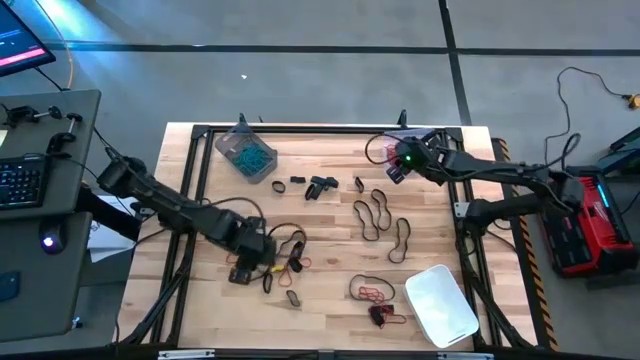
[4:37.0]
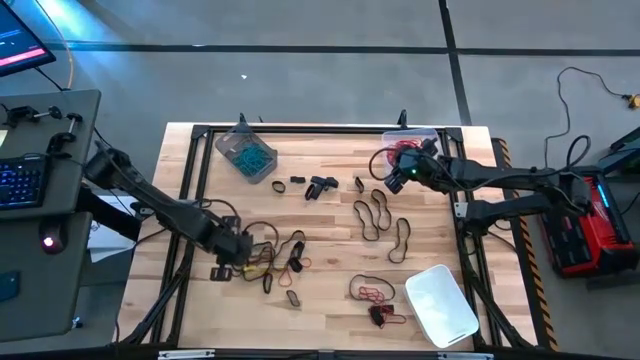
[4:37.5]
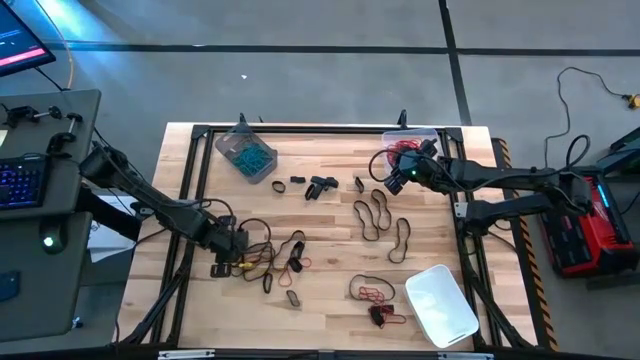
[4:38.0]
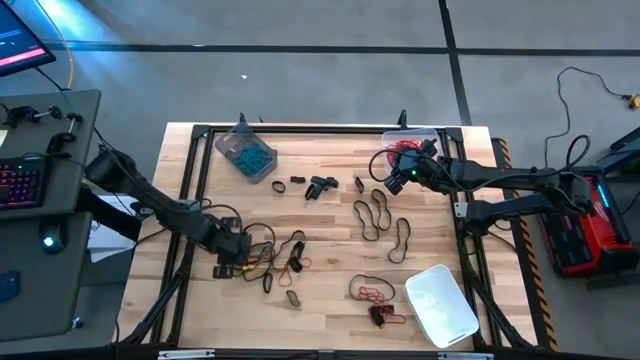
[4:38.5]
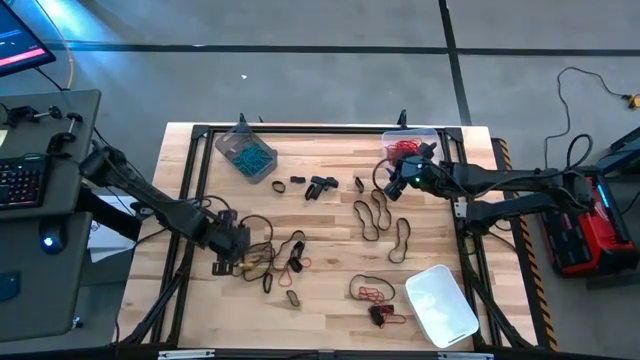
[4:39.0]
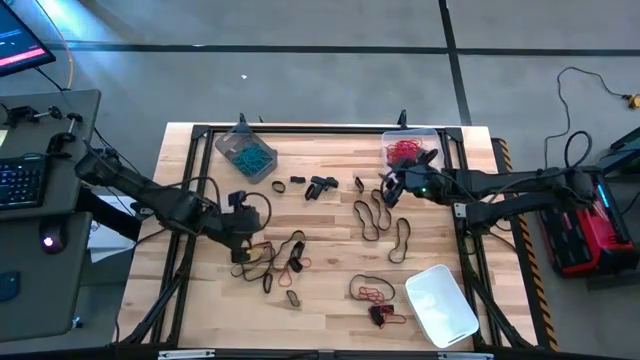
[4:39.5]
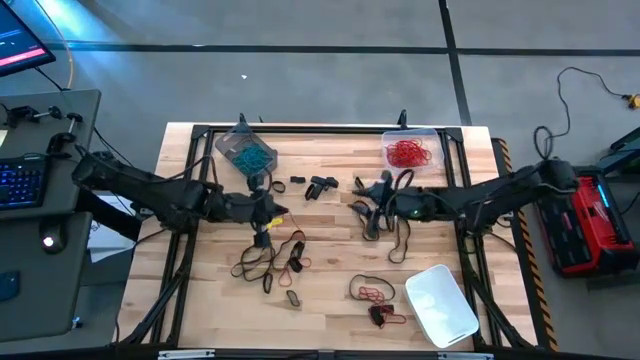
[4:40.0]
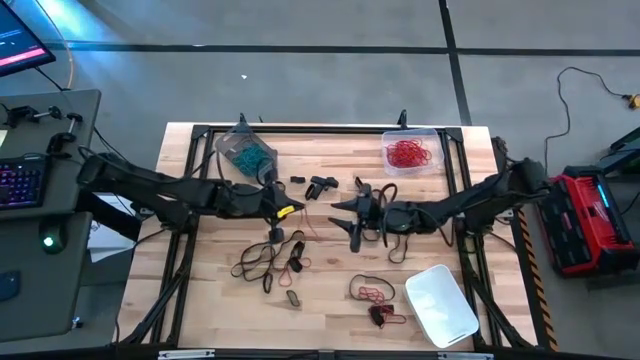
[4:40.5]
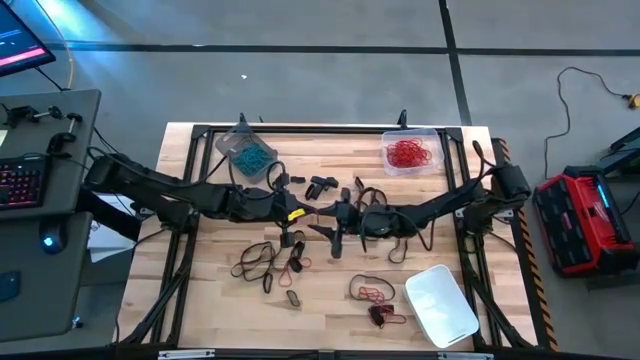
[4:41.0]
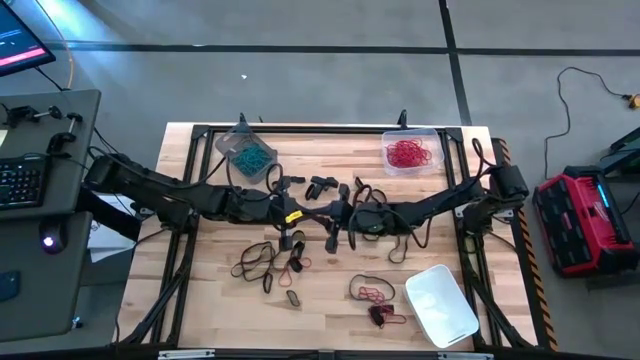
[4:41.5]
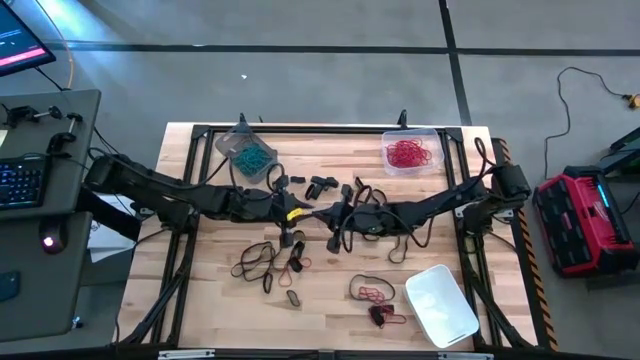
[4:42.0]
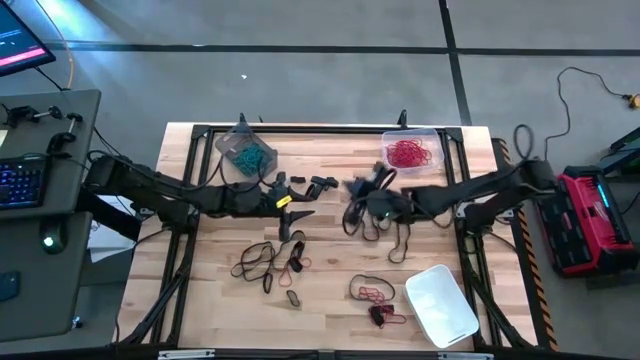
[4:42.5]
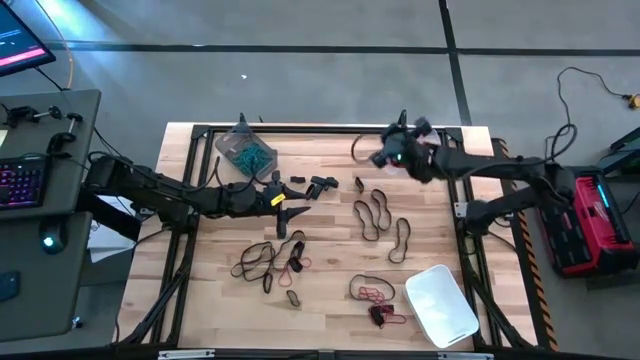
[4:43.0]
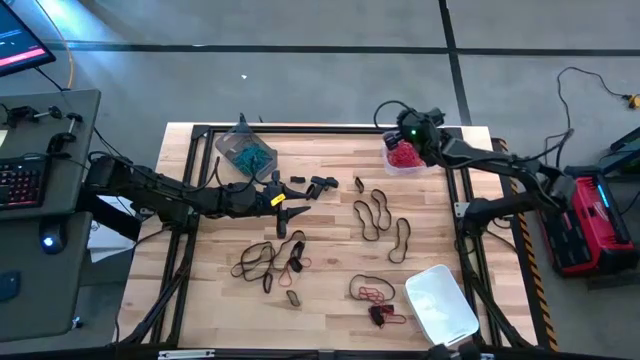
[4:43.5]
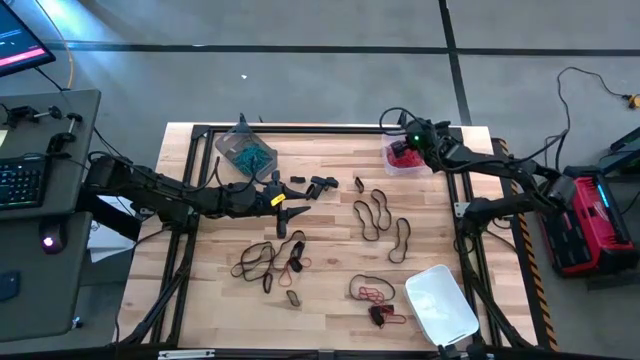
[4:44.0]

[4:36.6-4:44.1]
Task: Sort rubber bands into baskets
Put the red rubber band into the transparent bin

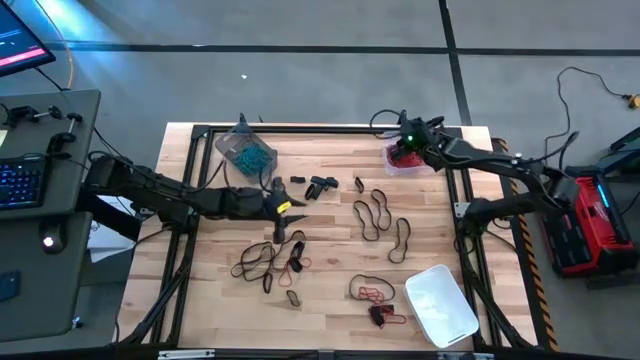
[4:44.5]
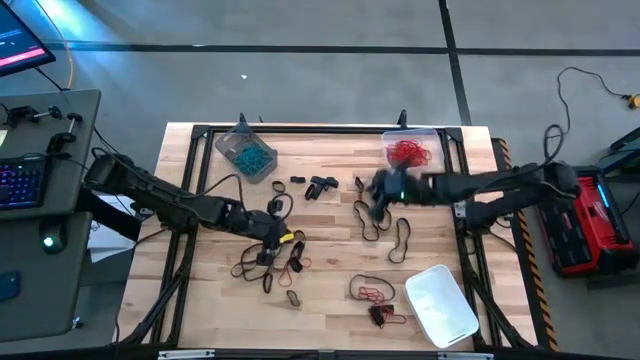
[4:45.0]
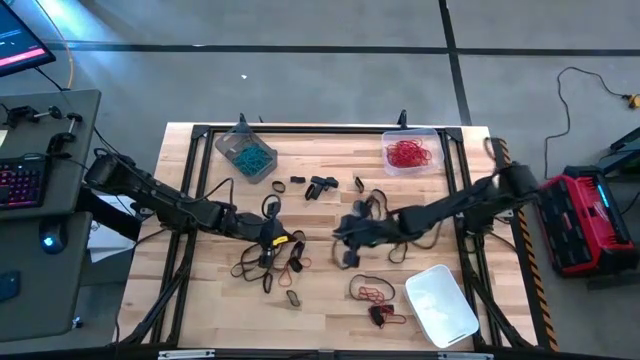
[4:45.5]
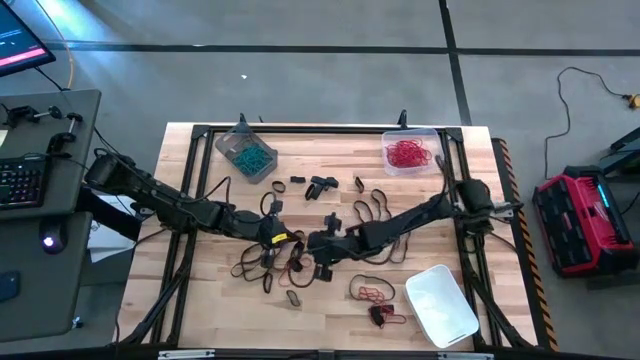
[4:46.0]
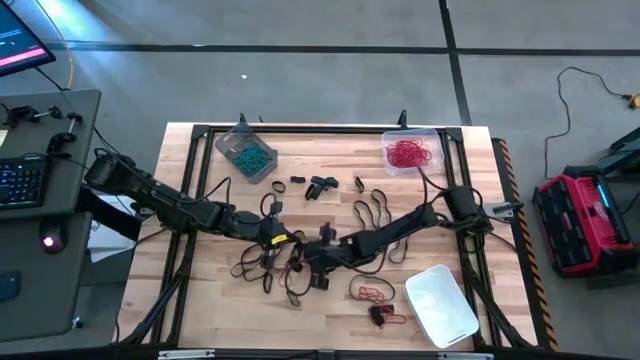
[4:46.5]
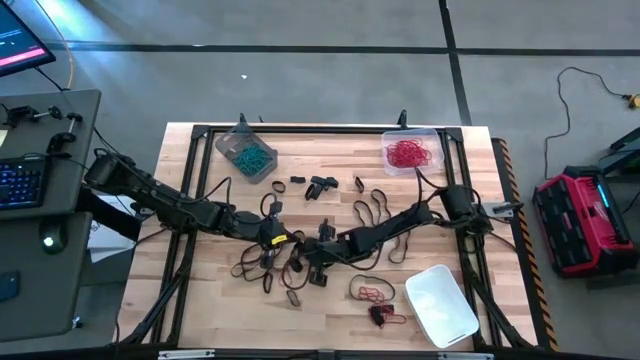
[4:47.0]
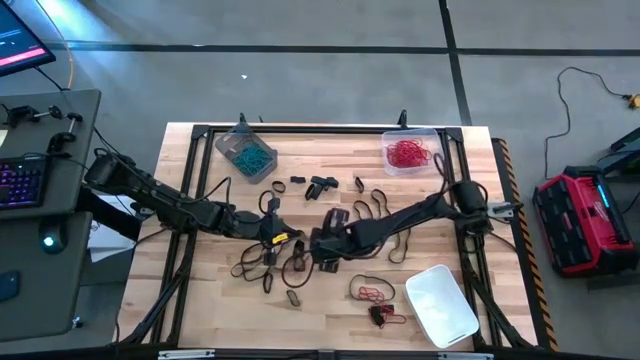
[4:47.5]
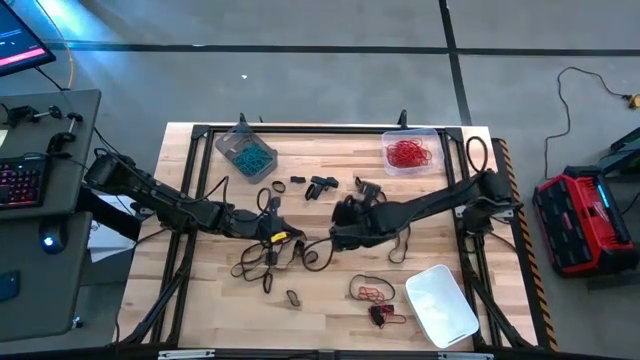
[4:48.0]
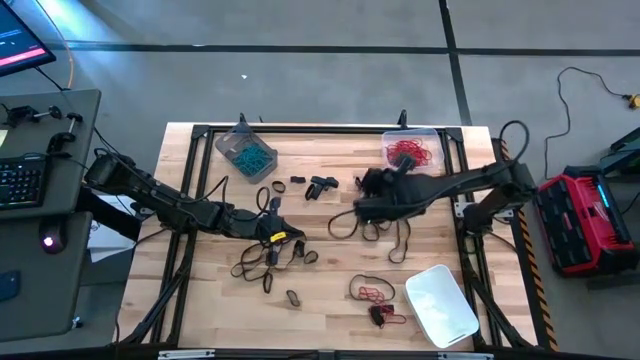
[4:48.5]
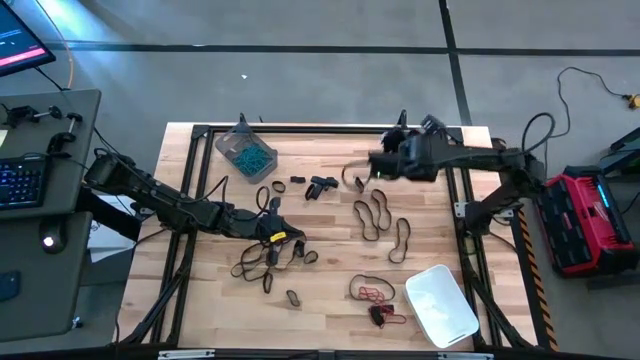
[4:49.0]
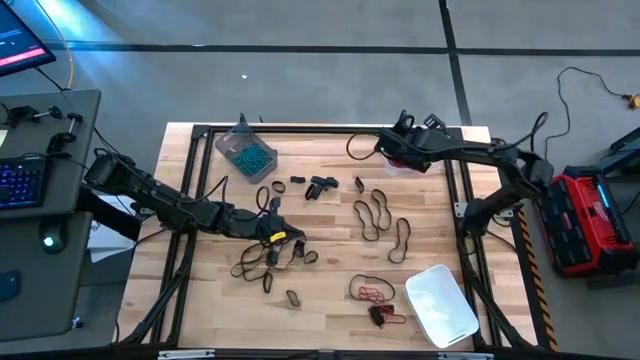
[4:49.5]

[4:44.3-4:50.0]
Put the red rubber band into the transparent bin

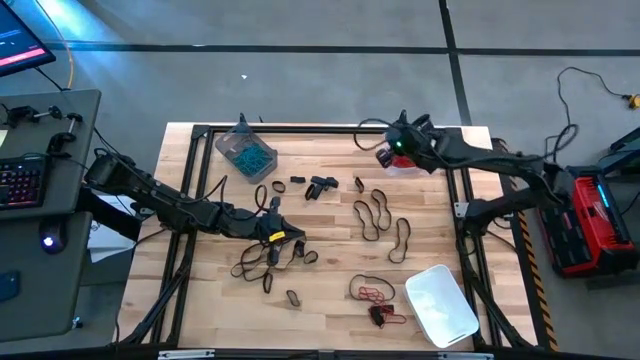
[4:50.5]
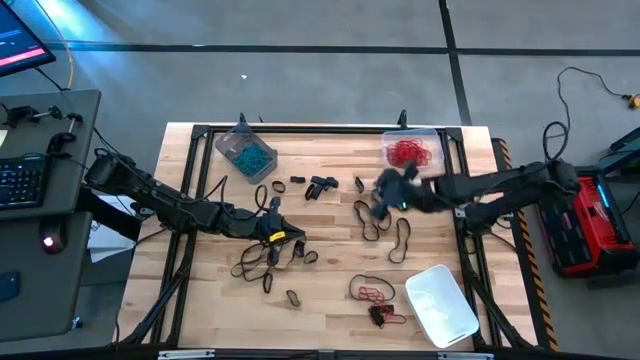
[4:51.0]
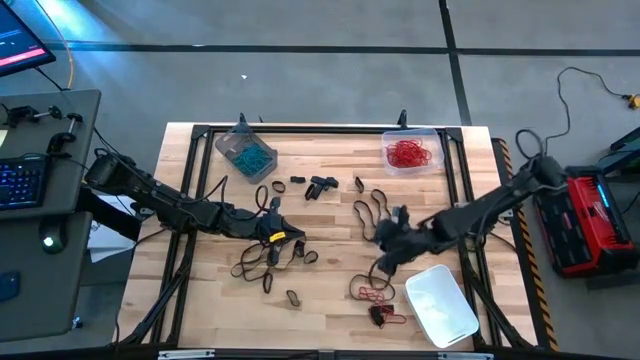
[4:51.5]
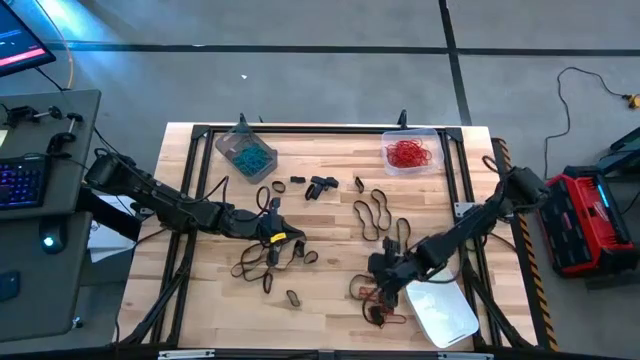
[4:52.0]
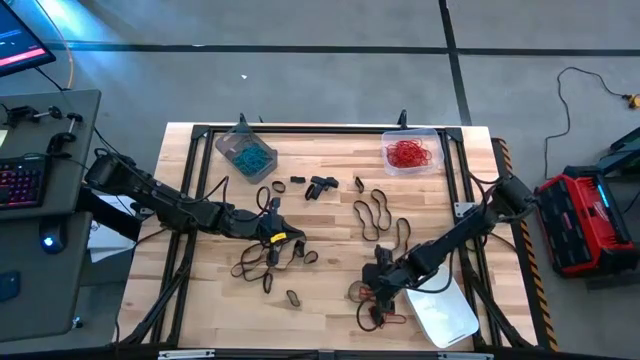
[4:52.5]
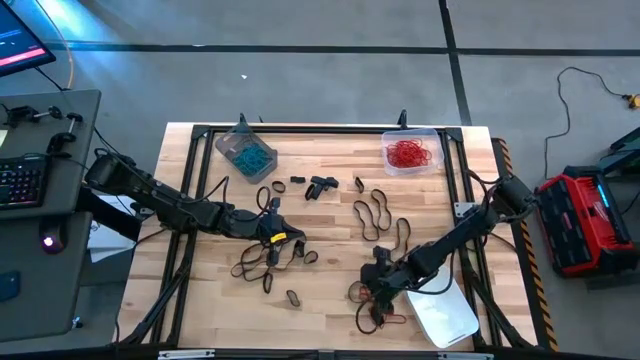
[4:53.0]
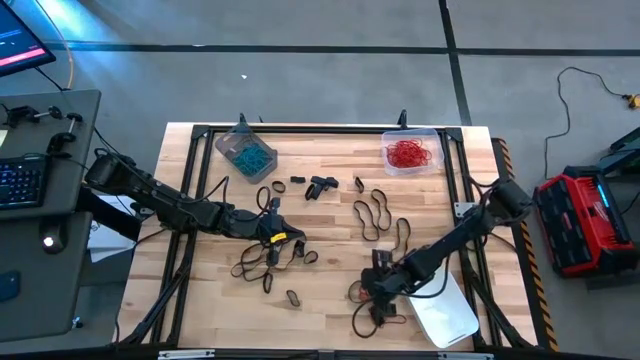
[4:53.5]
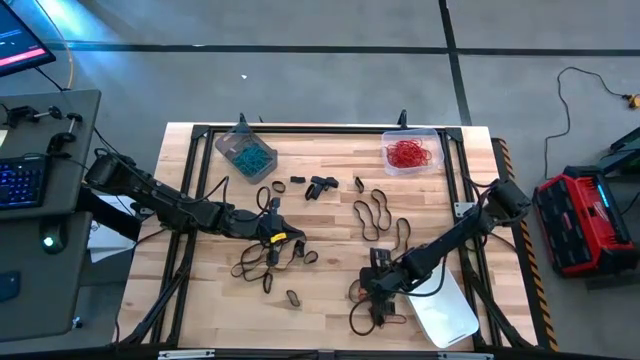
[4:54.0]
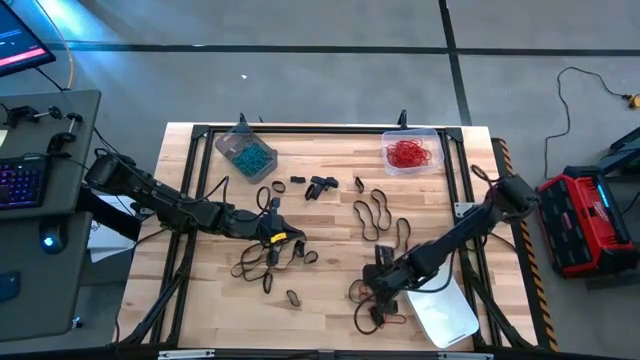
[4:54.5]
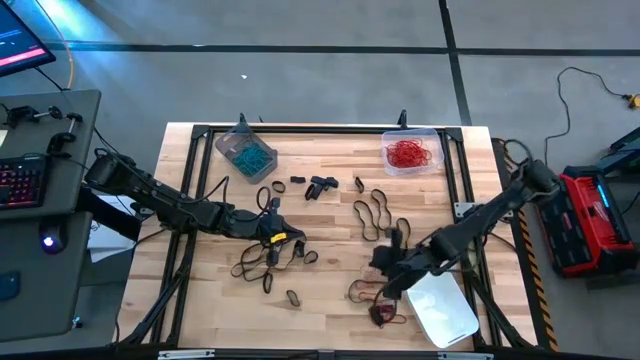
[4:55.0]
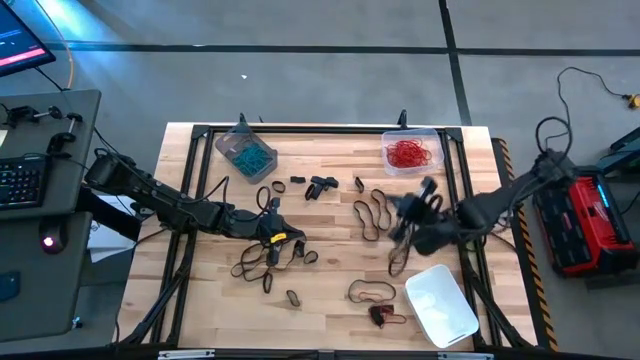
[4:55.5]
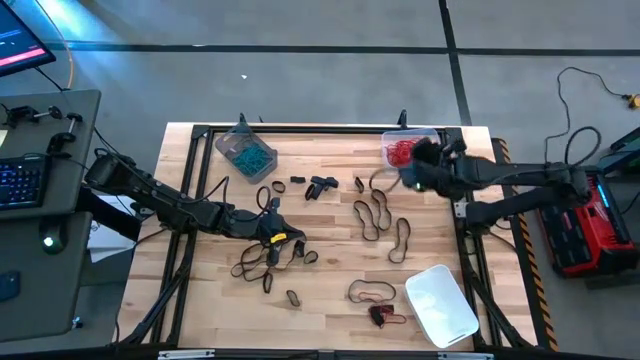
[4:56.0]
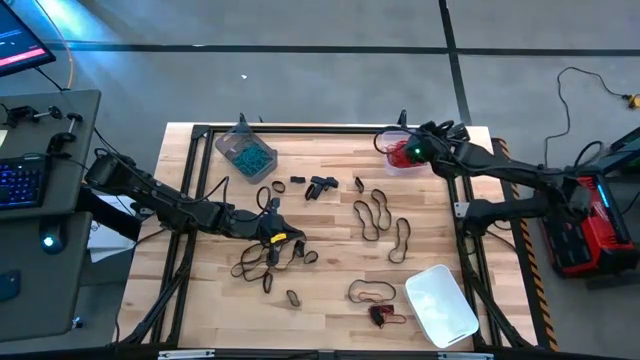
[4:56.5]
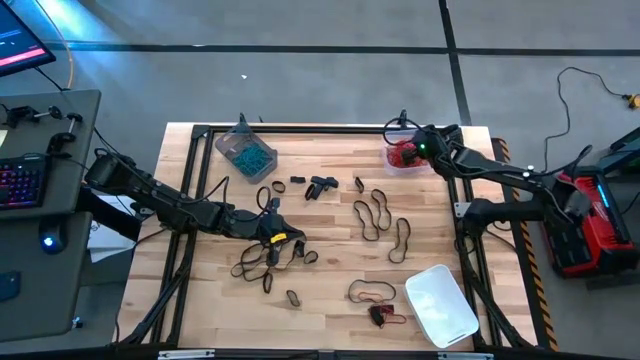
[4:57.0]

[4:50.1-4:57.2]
Put the red rubber band into the transparent bin

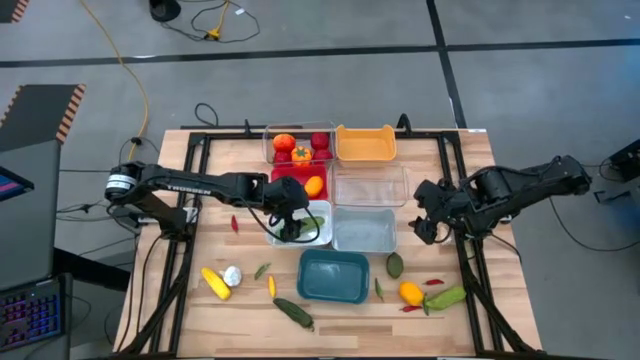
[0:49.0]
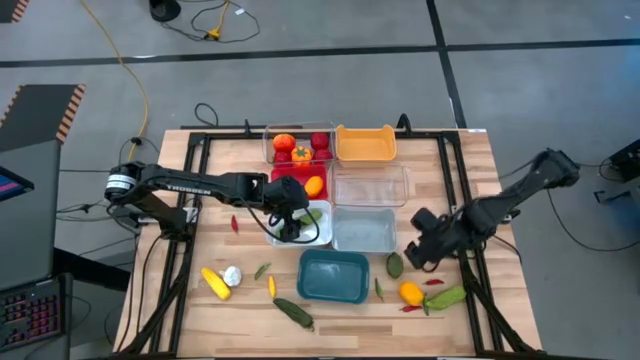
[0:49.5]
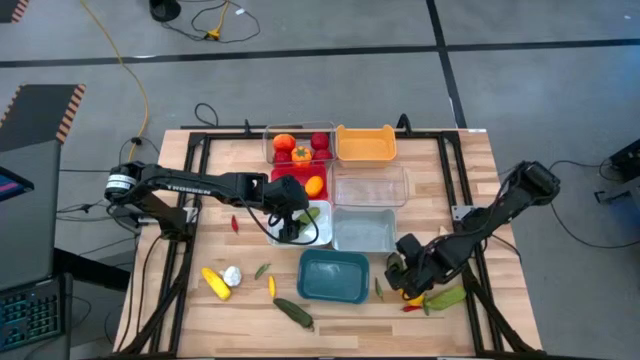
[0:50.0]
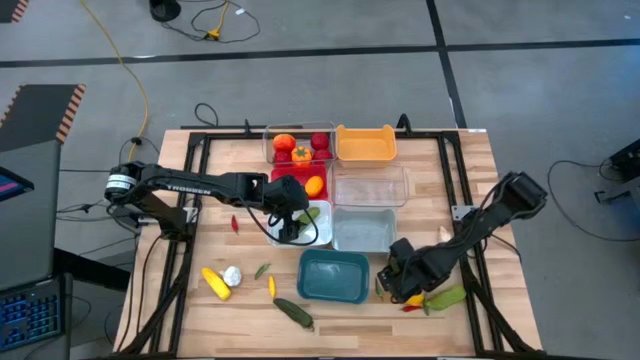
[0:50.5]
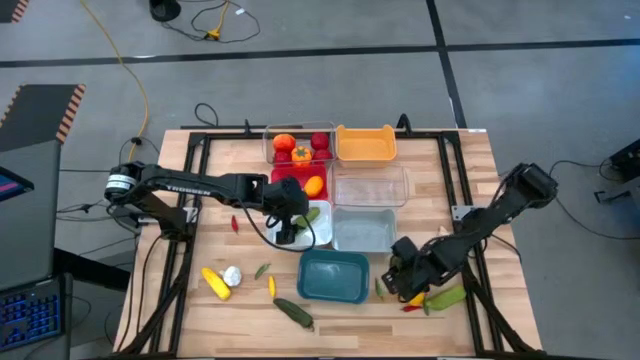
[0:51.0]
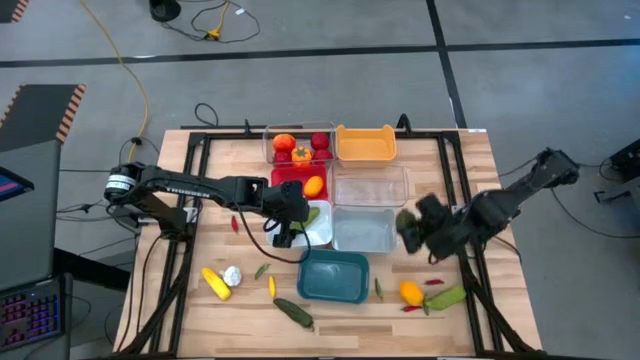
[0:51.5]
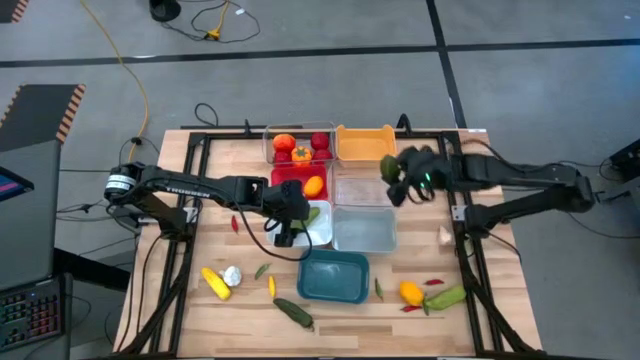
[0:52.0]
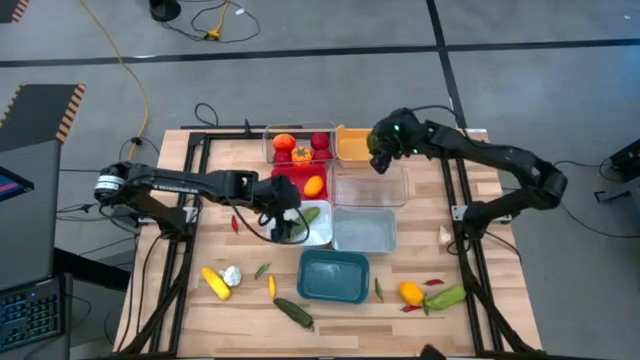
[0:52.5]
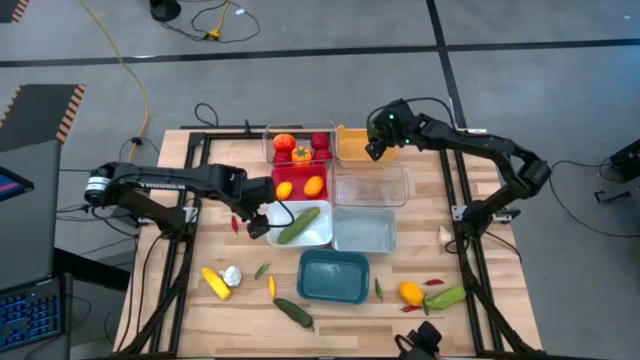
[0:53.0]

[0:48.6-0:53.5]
Task: Sort produce into baskets
Put the green lime into the yellow bin
